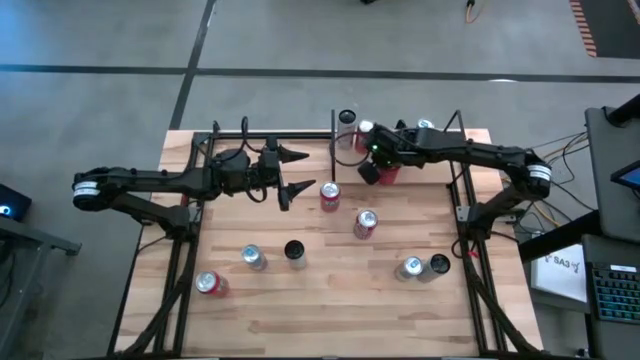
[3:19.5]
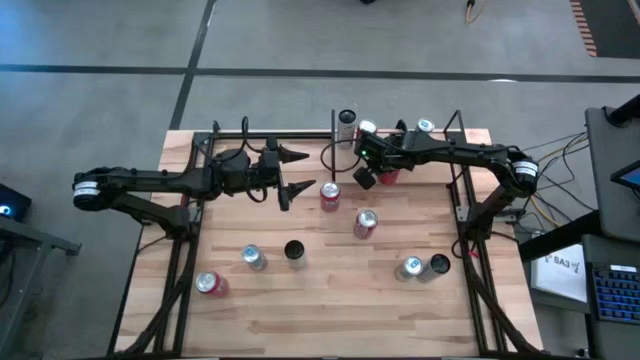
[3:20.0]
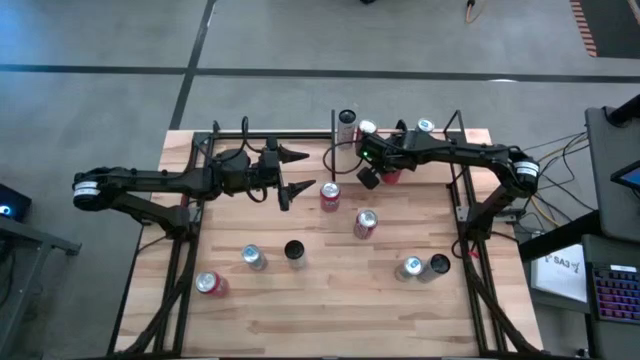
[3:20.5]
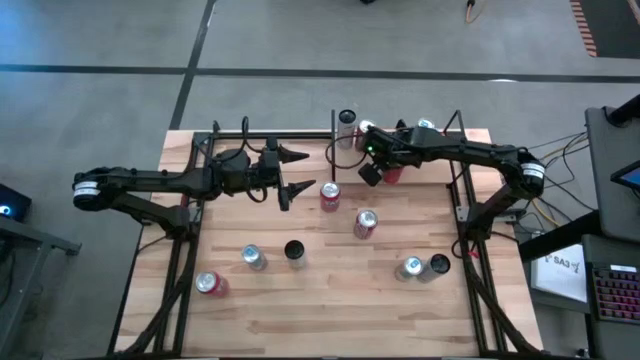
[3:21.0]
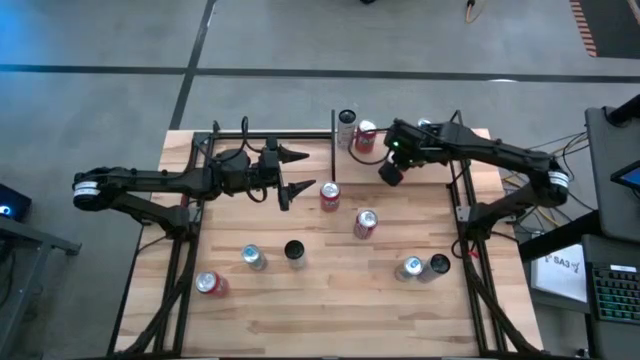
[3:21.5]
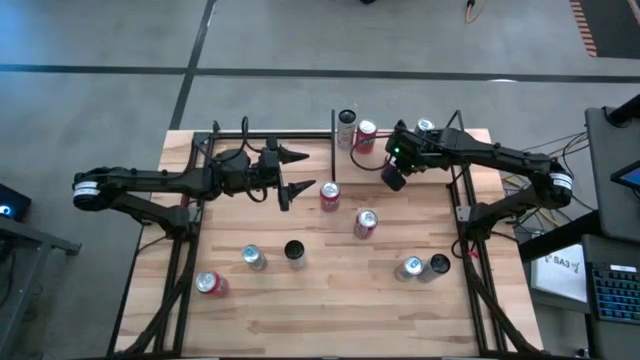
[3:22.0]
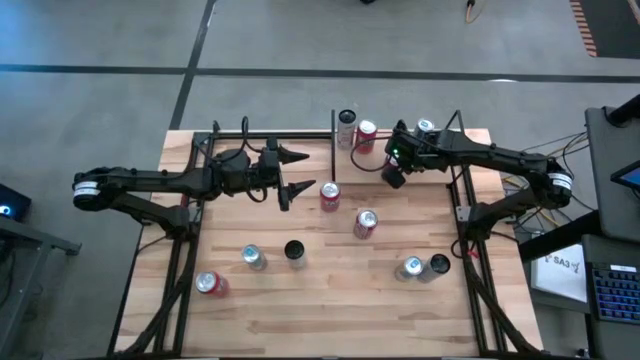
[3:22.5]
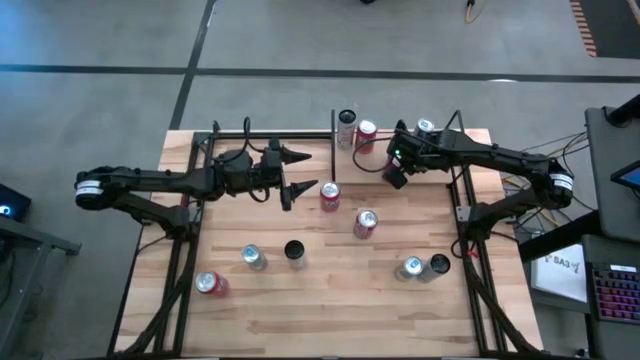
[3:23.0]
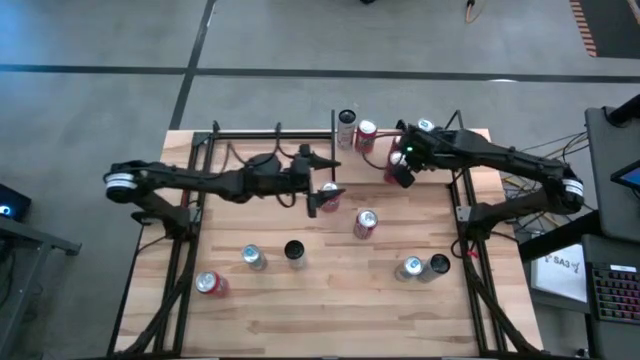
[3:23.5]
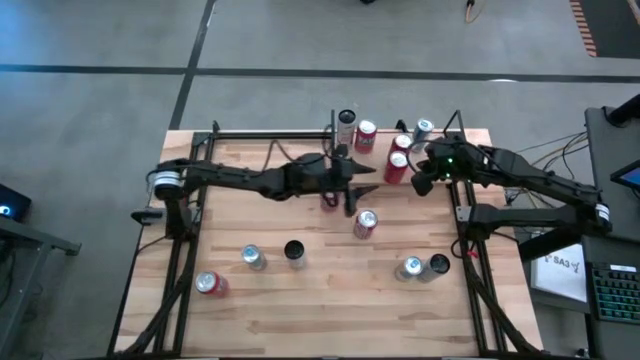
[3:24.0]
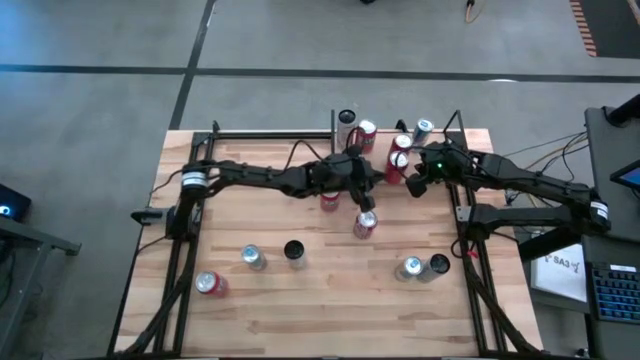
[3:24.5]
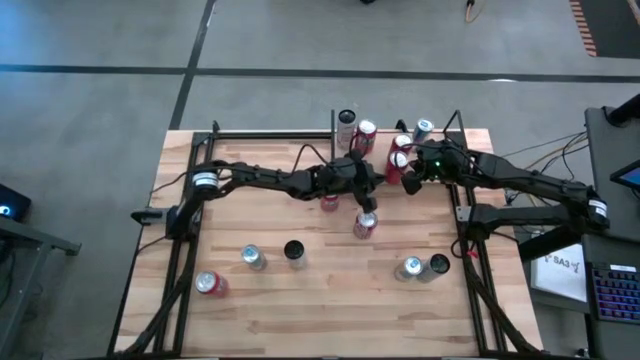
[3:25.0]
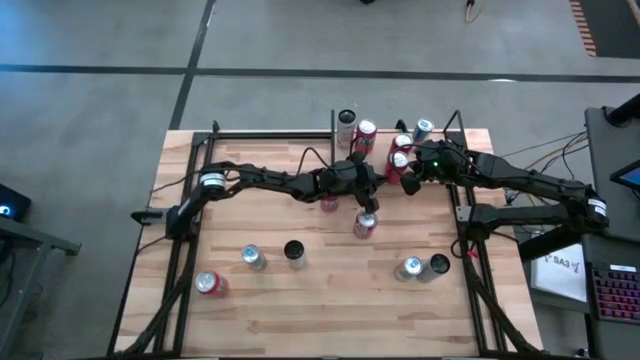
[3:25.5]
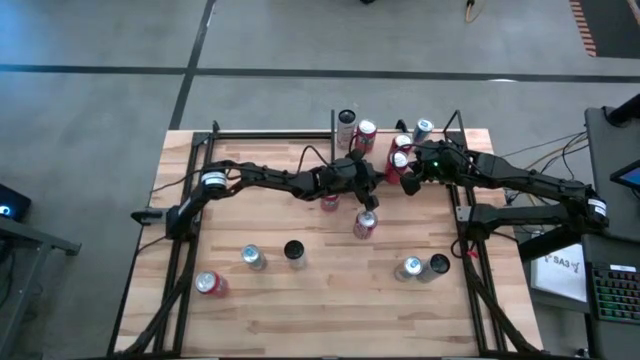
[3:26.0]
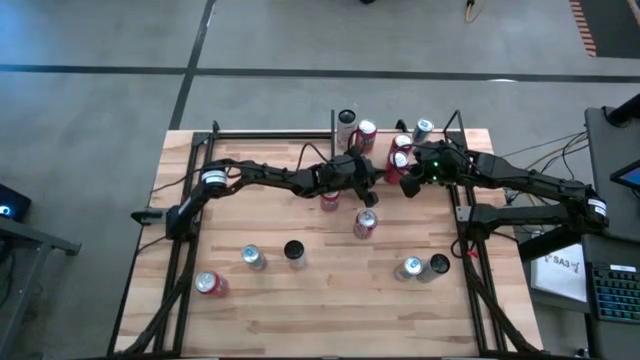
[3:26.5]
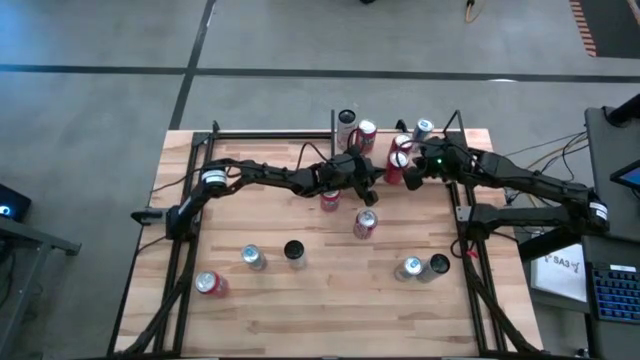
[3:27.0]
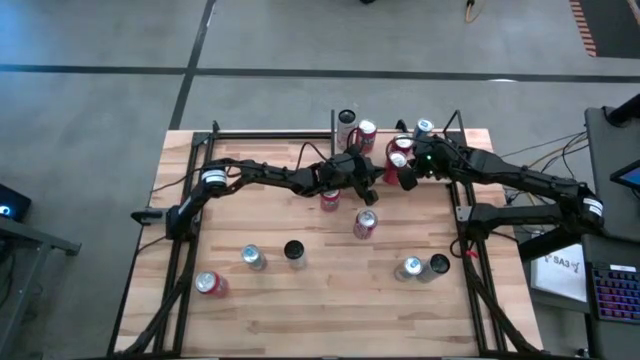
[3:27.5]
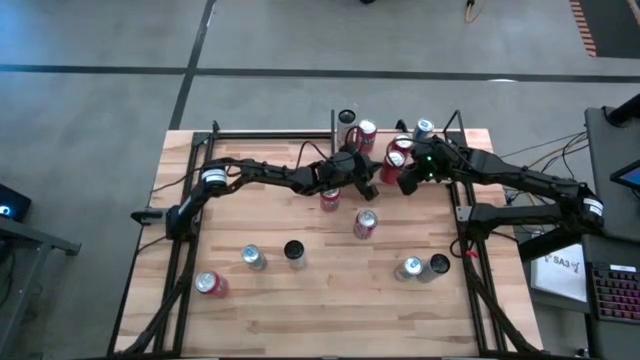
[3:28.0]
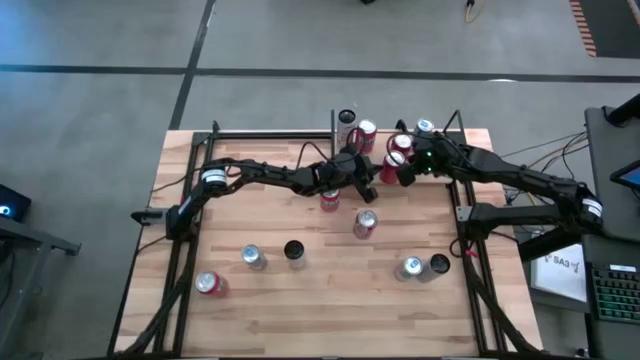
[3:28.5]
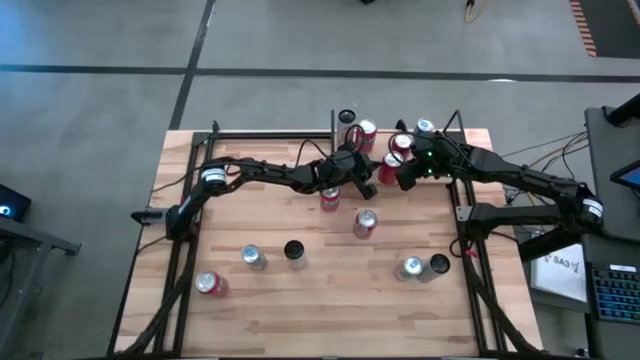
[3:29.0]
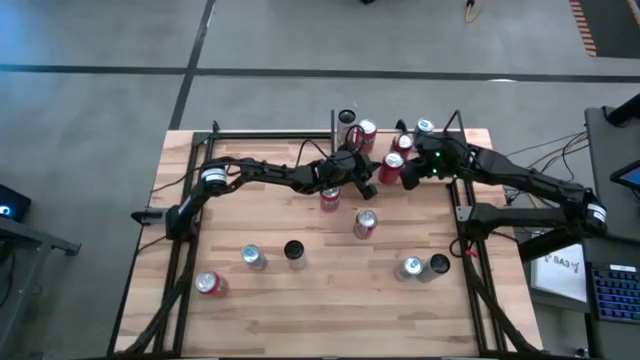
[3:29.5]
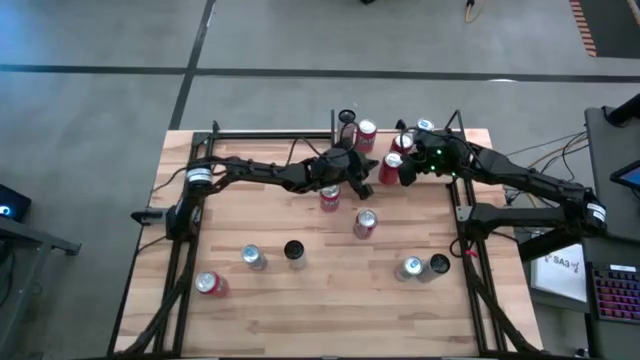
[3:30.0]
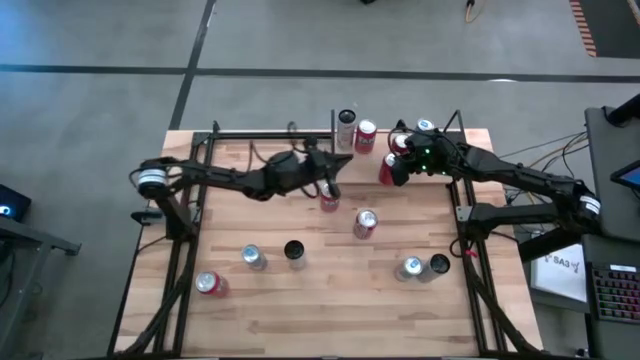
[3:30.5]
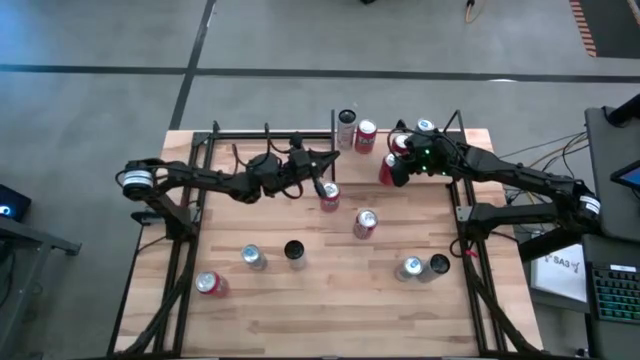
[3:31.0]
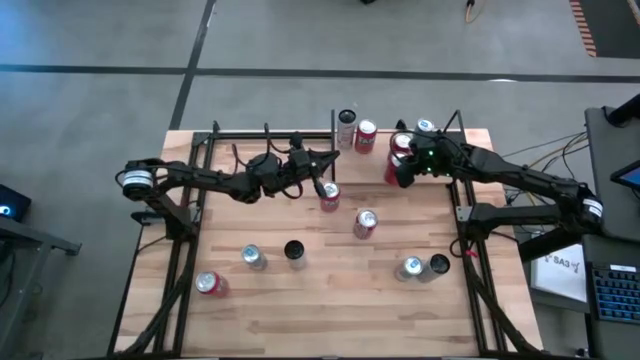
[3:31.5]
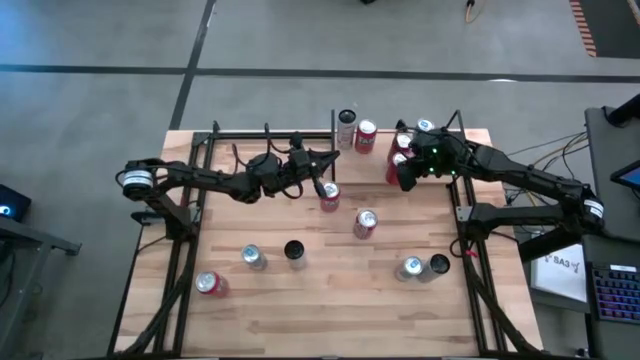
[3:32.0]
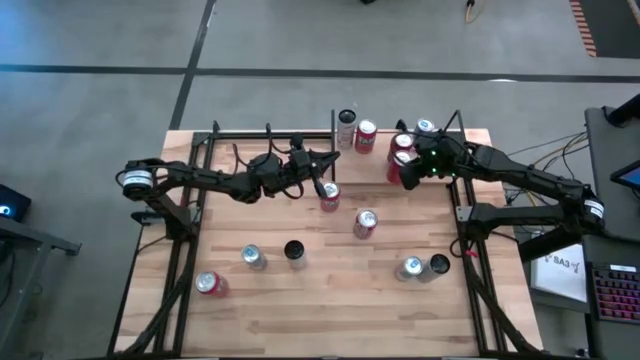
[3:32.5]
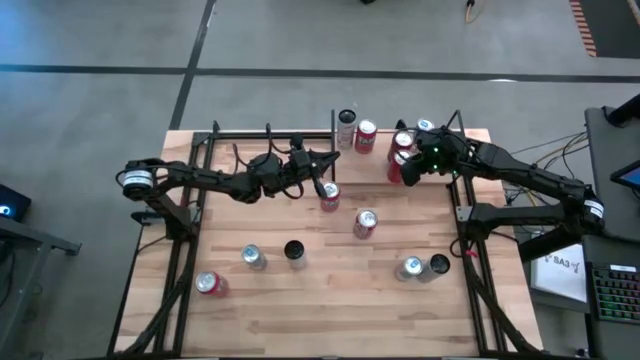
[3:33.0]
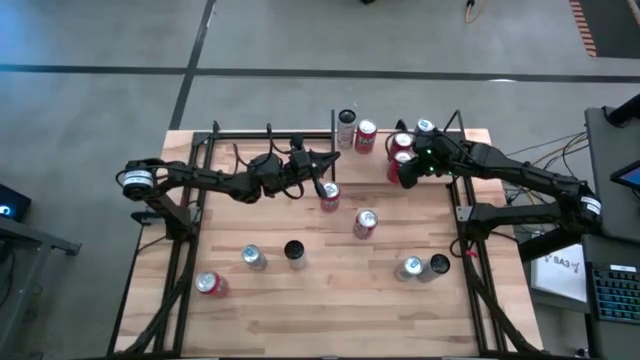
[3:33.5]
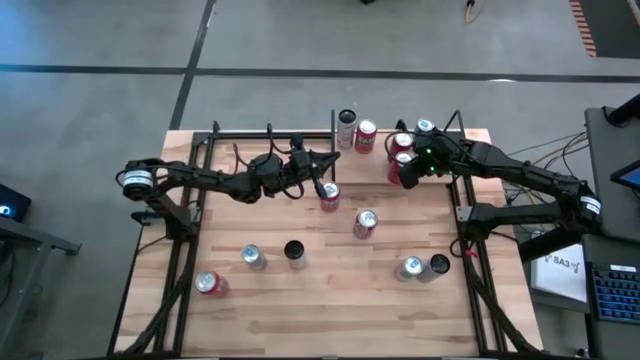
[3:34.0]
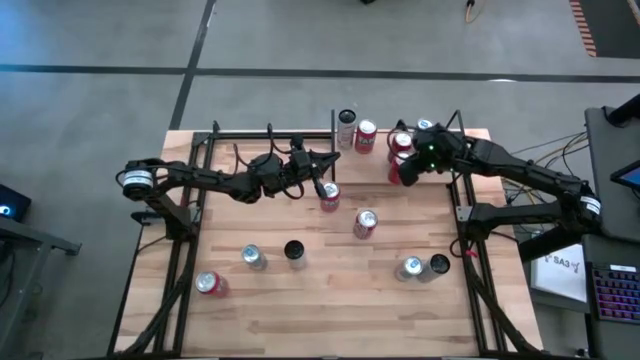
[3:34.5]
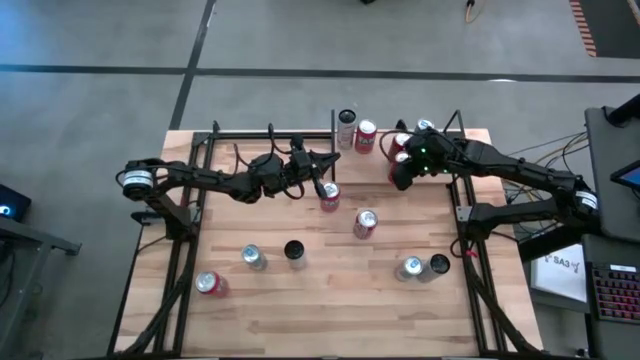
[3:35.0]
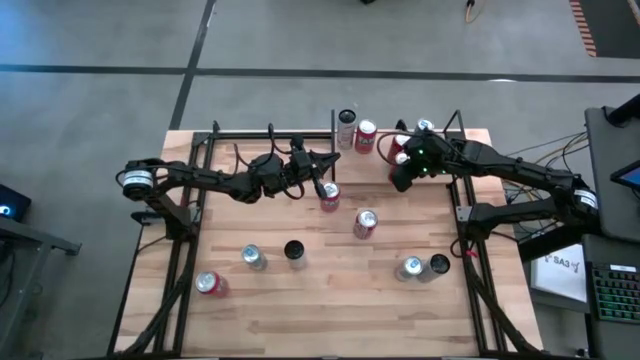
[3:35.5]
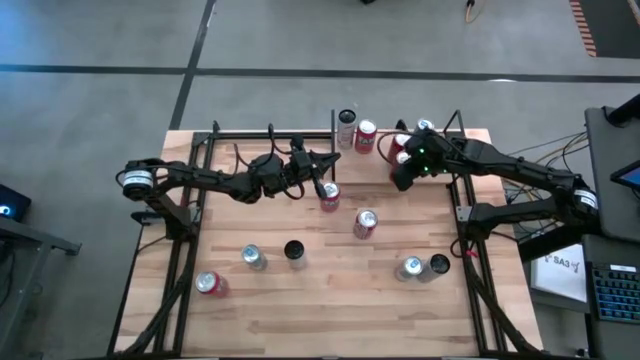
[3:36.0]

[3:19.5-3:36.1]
Task: Place canned beverage on shelf
Put the red black soda can on the shelf aligned with the other red black soda can

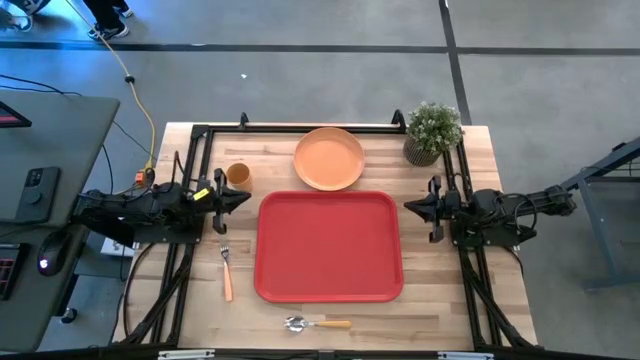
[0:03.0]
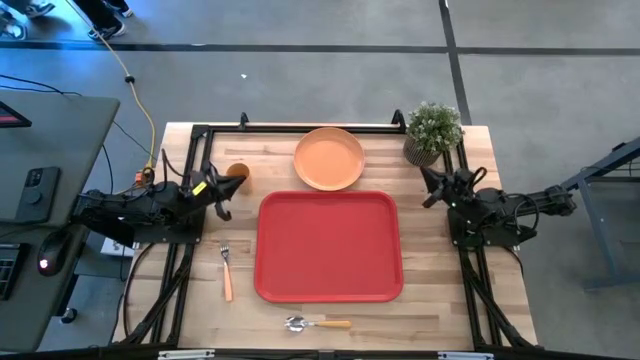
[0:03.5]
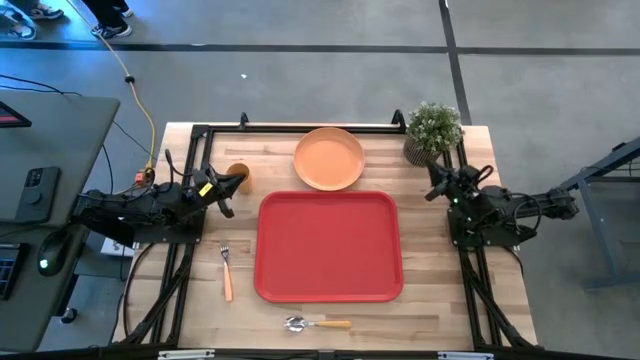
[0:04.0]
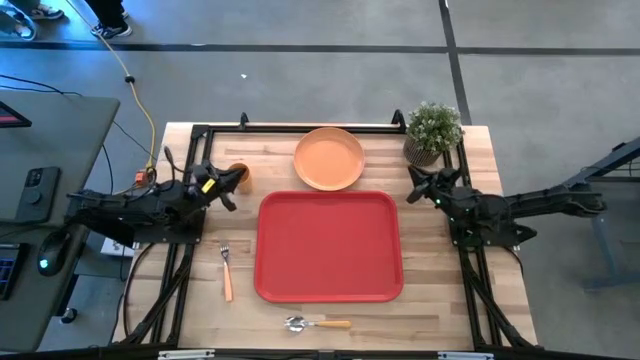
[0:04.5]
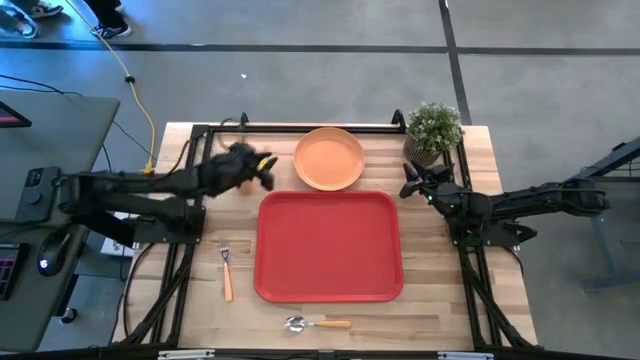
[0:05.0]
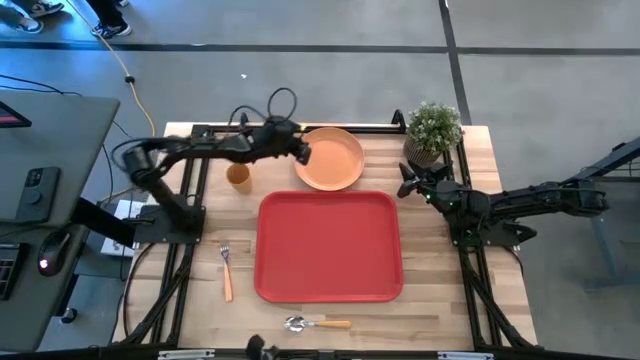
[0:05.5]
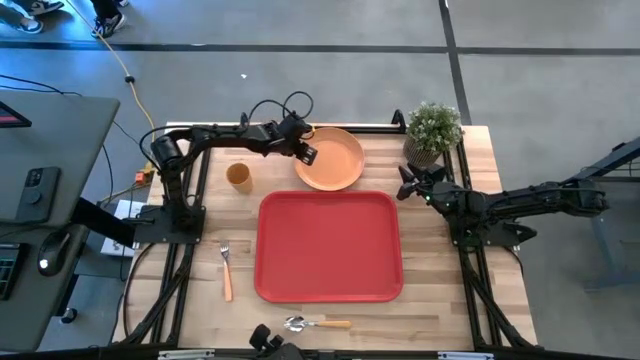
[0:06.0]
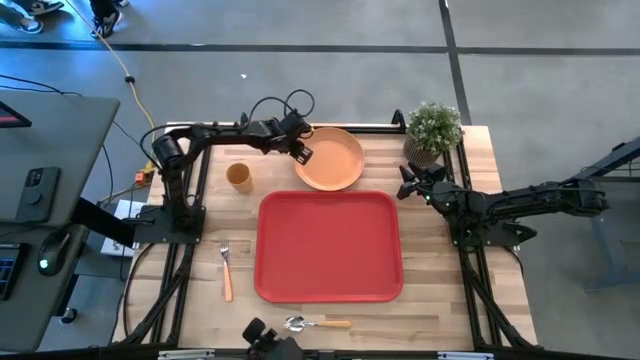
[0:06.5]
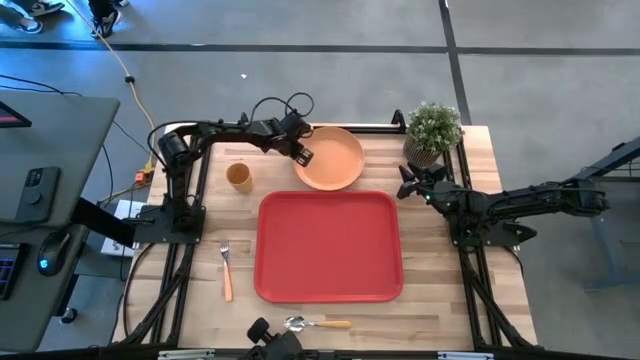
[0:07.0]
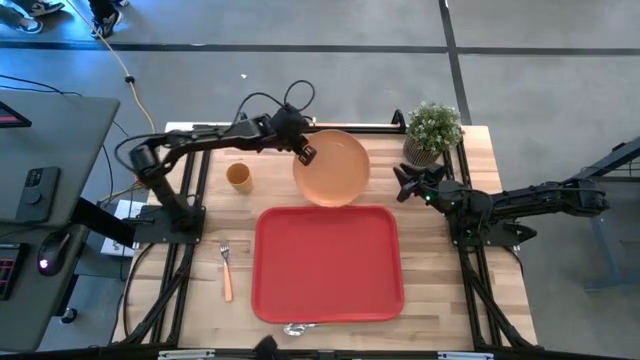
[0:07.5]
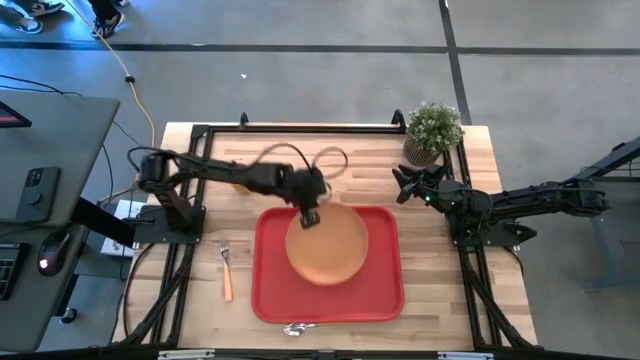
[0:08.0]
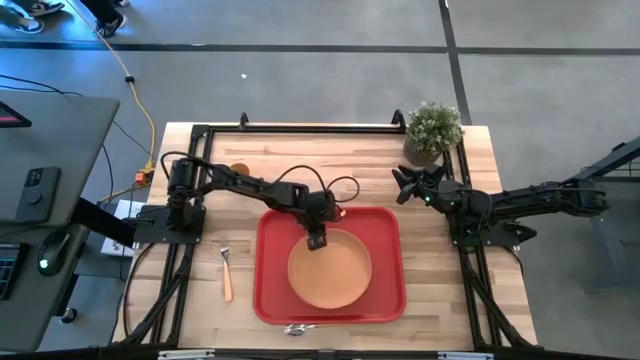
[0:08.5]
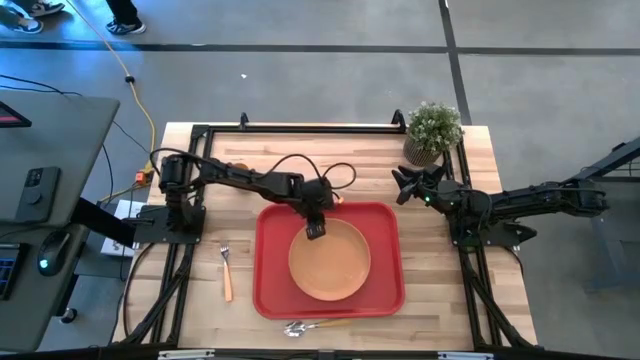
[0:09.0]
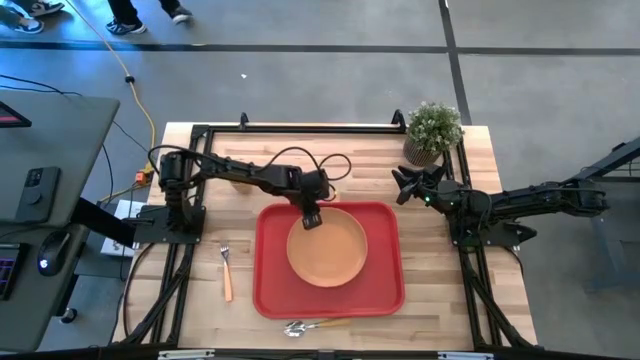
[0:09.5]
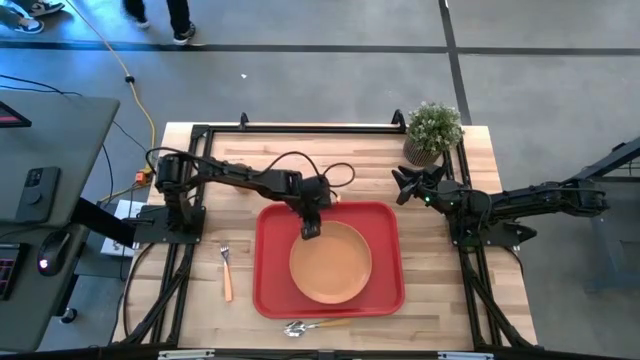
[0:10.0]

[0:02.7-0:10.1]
Task: Pick and place plate/cup/fork/spoon on tray
Put the orange plate on the red tray
